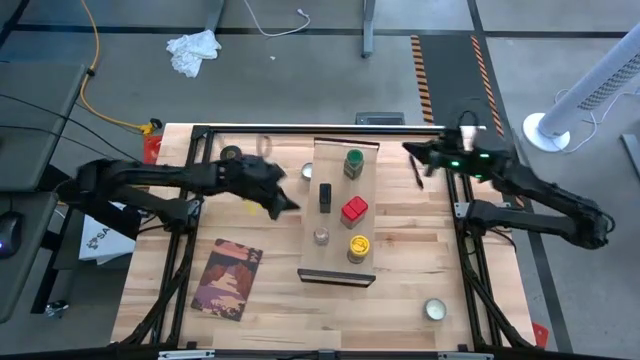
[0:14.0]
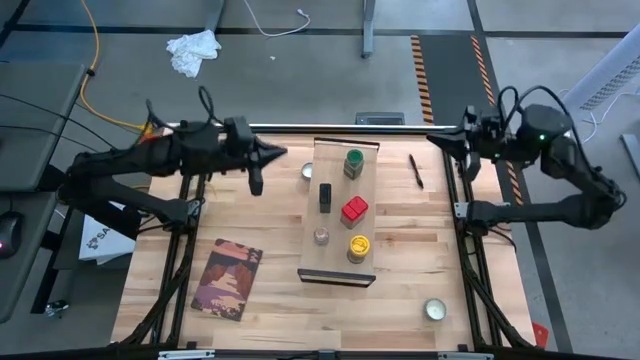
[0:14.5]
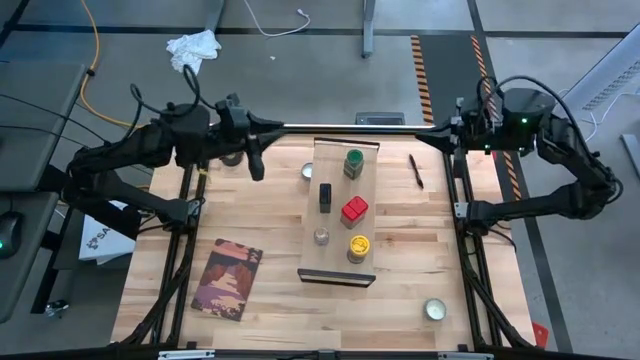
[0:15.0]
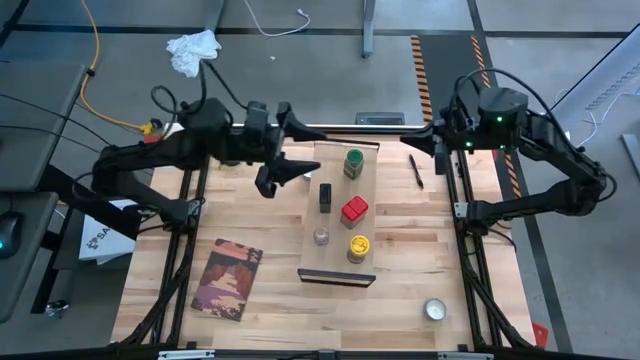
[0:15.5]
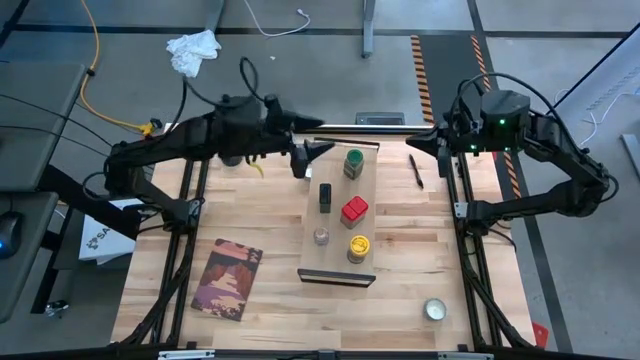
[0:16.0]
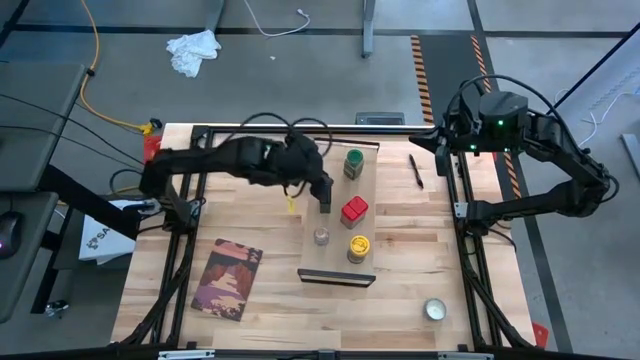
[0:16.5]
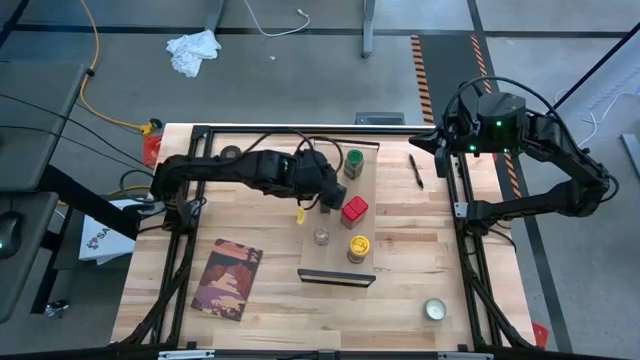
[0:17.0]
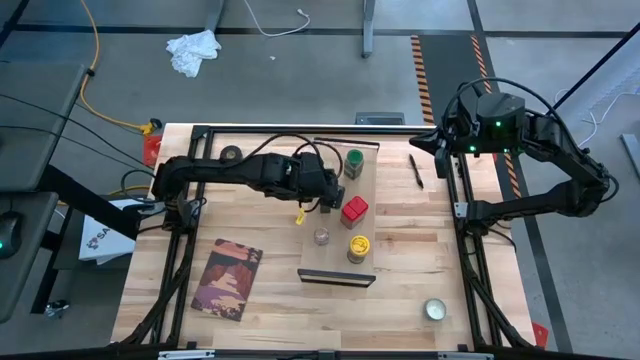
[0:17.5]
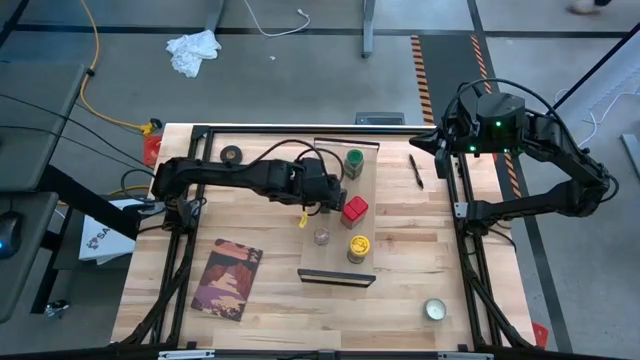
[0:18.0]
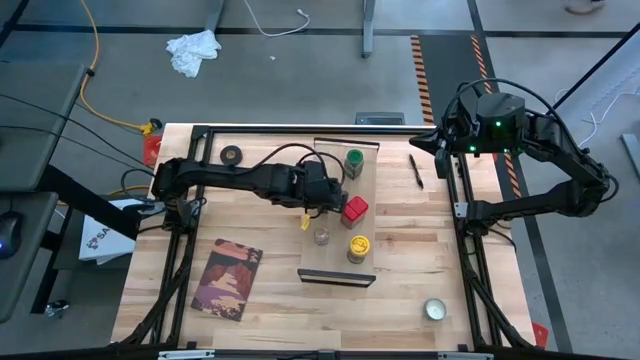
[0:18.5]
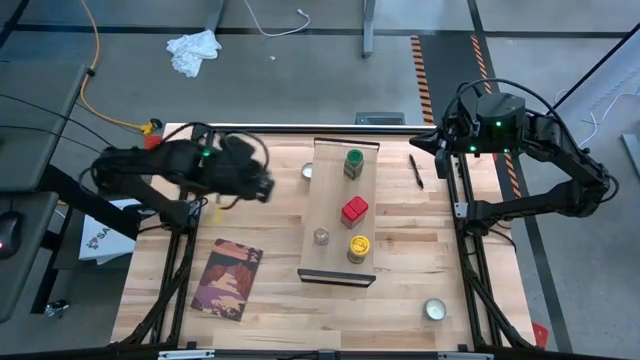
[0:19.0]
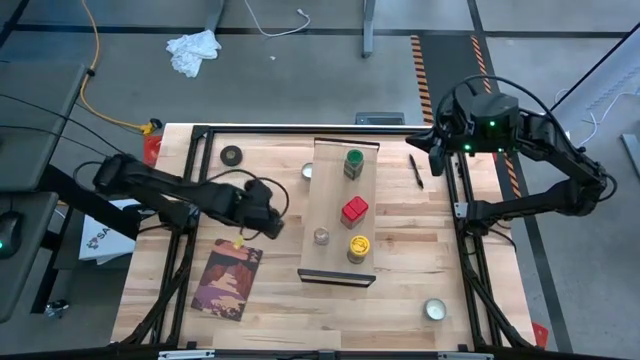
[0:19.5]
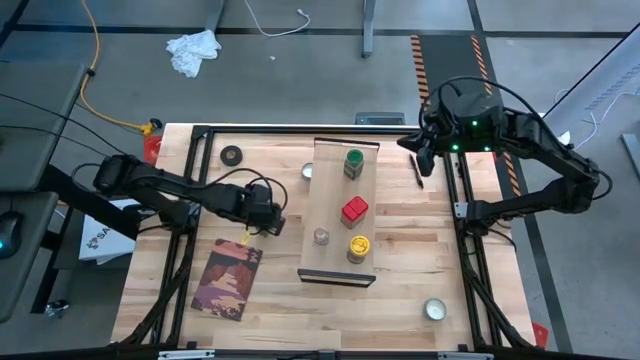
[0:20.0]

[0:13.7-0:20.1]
Task: Shelf spices
Remove the black seasoning can from the shelf

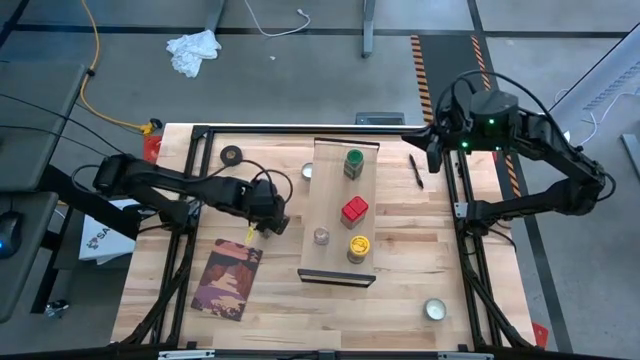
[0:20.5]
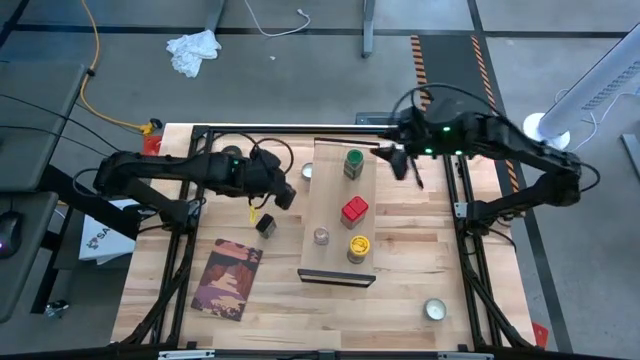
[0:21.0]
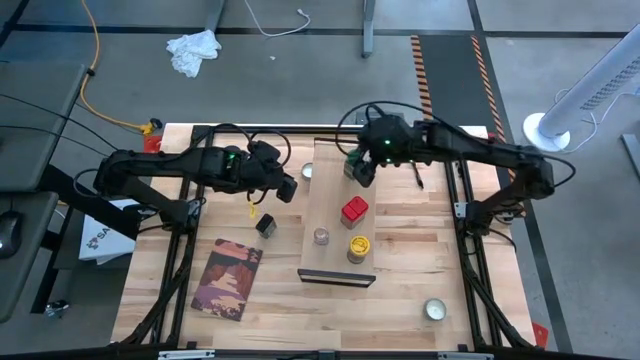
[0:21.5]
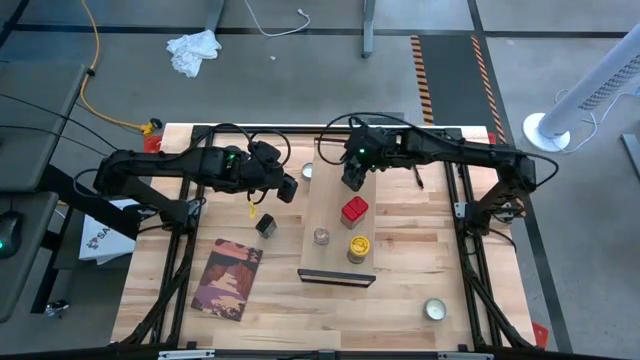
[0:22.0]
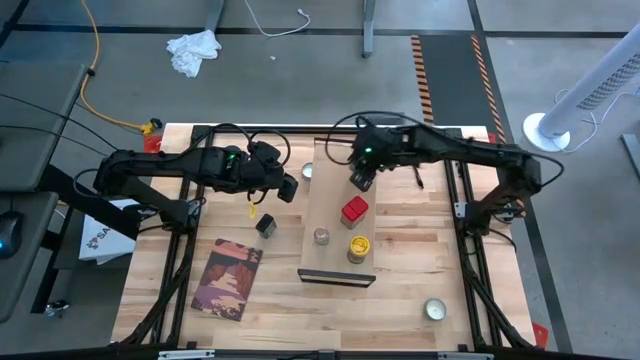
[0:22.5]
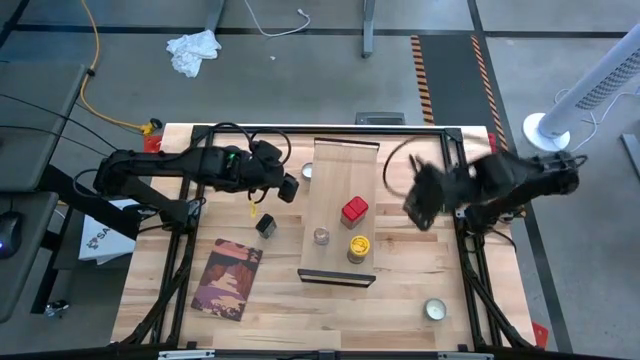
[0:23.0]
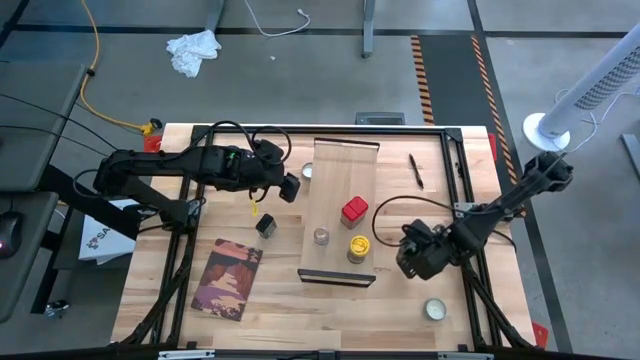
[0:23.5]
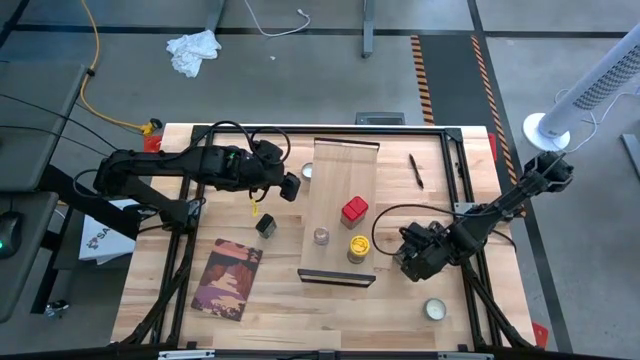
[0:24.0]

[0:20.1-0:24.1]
Remove the green seasoning bottle from the shelf

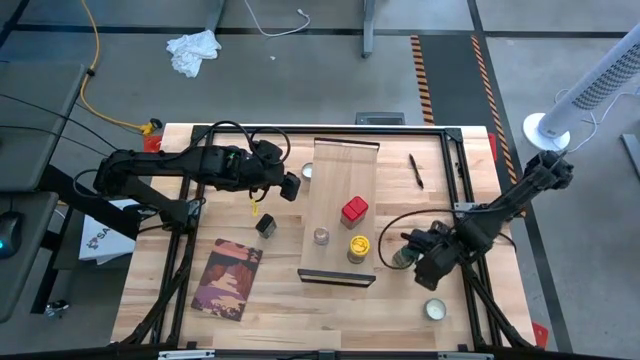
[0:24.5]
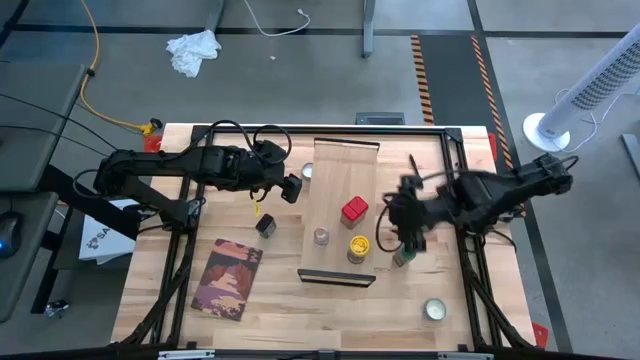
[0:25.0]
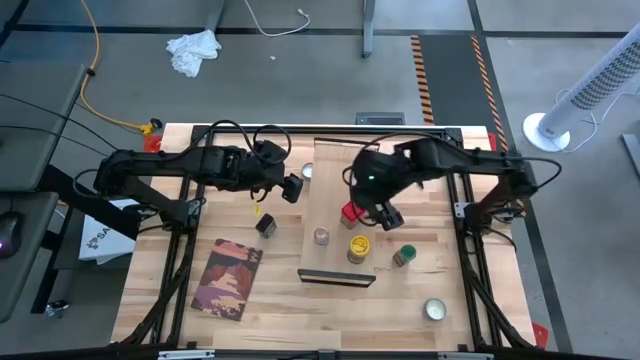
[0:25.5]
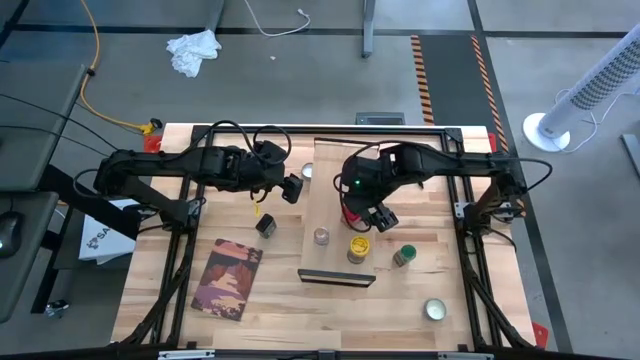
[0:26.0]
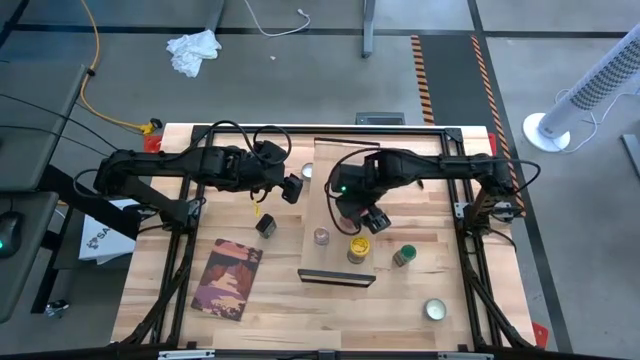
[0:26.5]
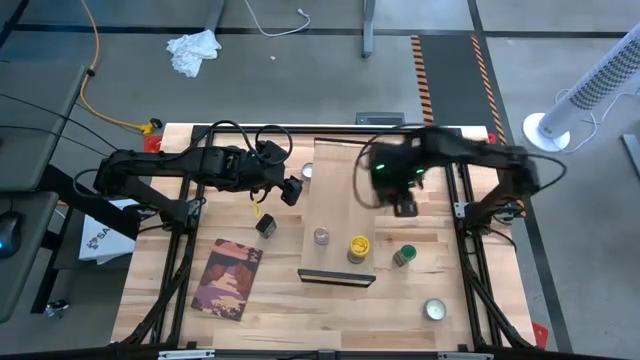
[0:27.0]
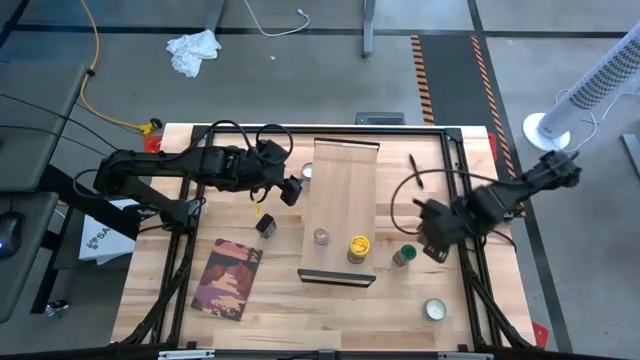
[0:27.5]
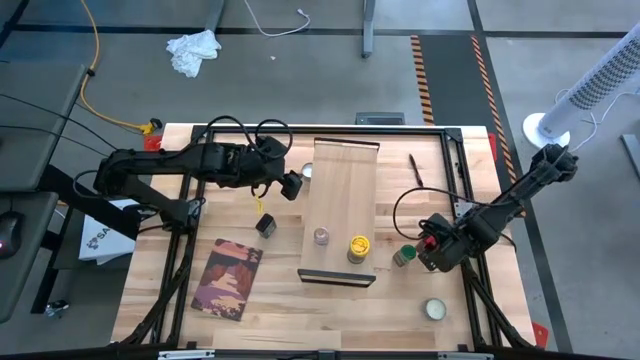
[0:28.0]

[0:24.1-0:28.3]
Remove the red seasoning can from the shelf

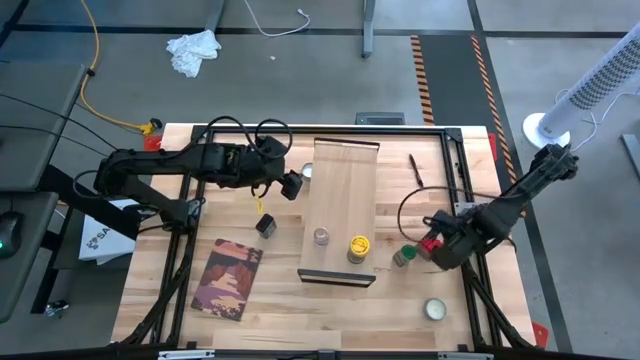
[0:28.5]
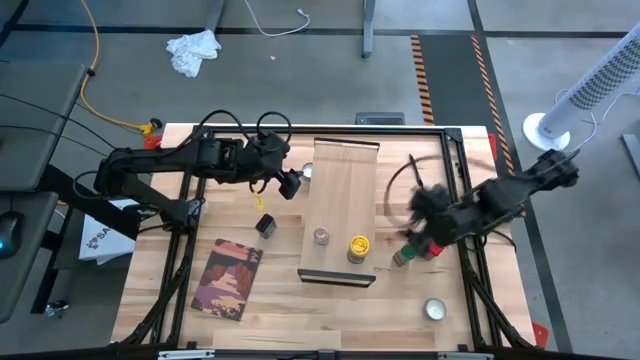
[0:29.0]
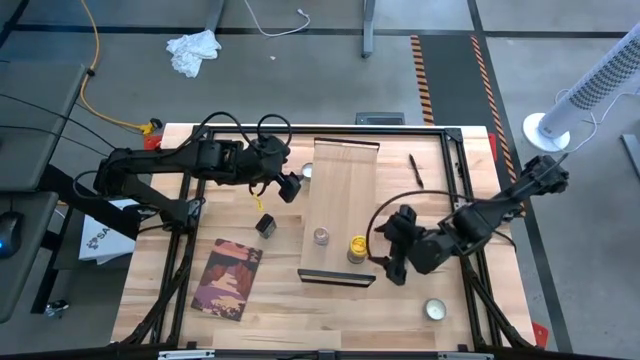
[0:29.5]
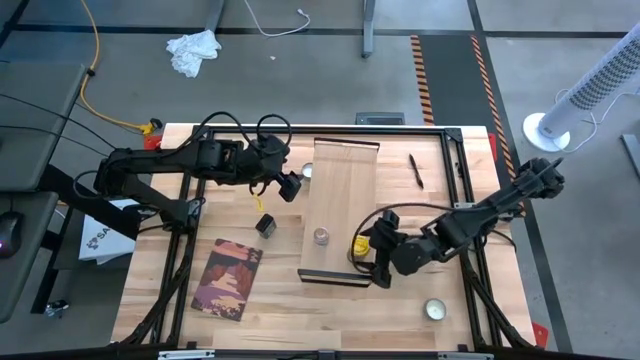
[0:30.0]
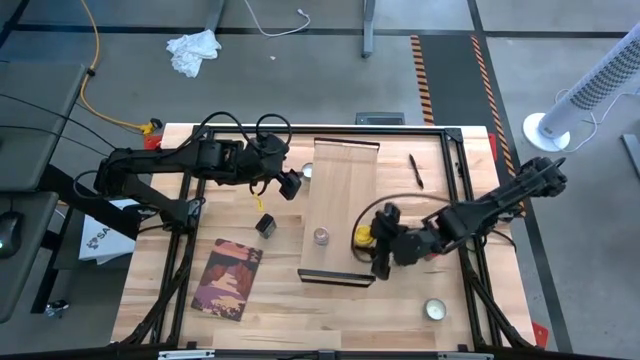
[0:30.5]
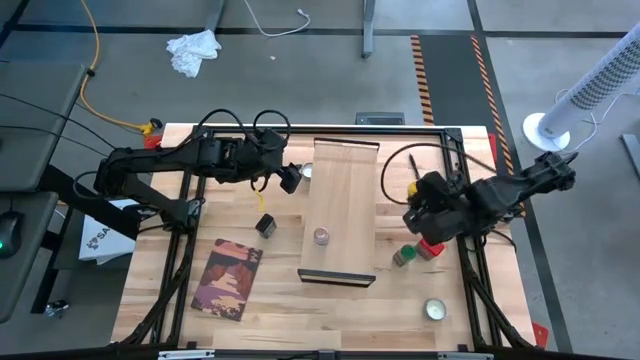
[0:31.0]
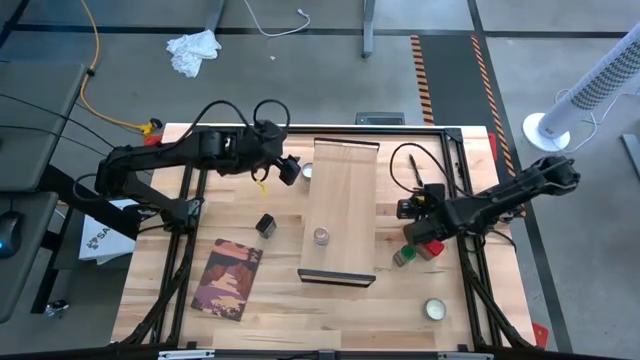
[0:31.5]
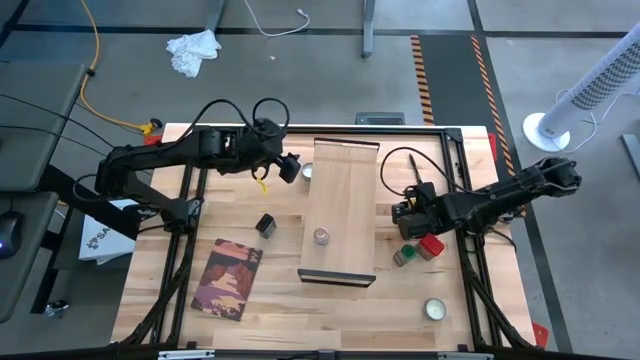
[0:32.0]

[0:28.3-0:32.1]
Remove the yellow seasoning can from the shelf

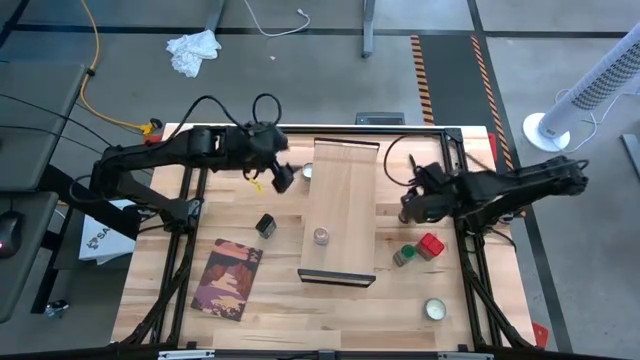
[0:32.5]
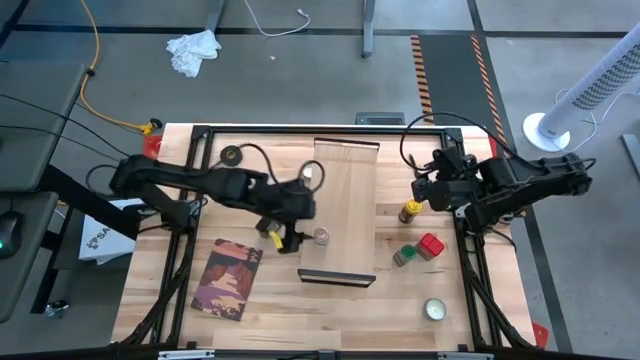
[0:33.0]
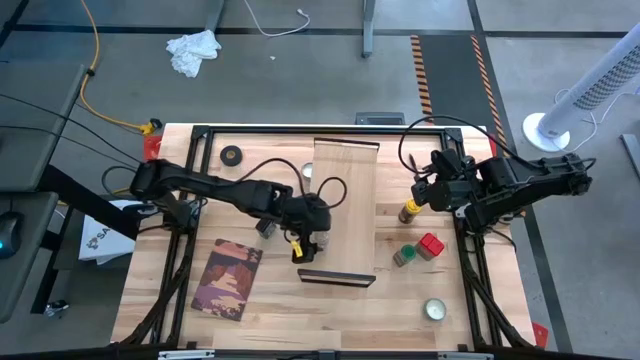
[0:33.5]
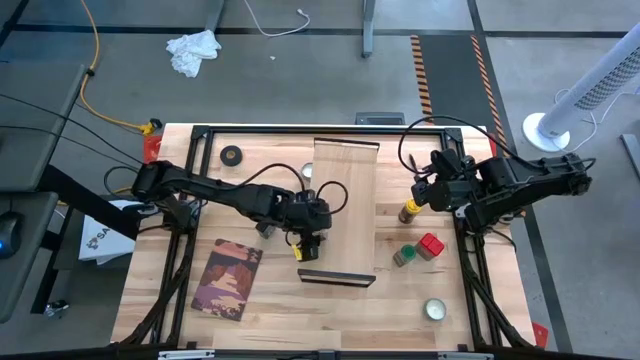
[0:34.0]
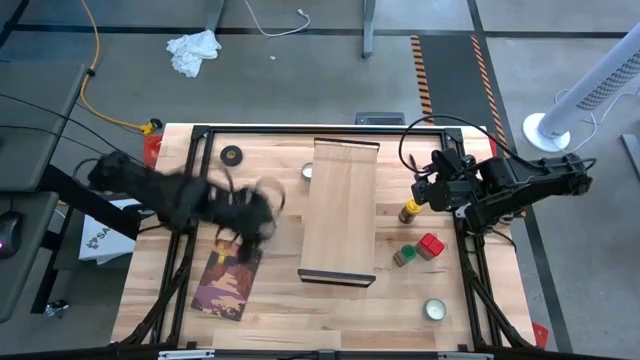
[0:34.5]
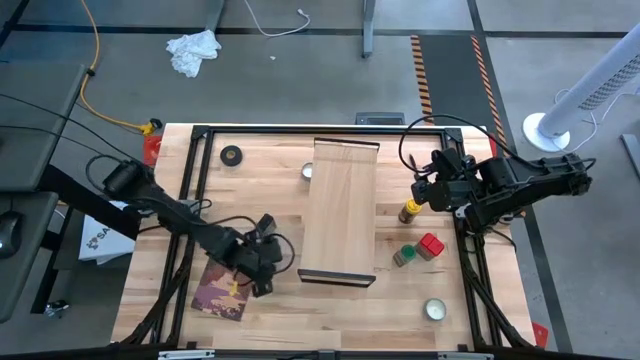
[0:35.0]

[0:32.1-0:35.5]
Remove the brown seasoning bottle from the shelf
